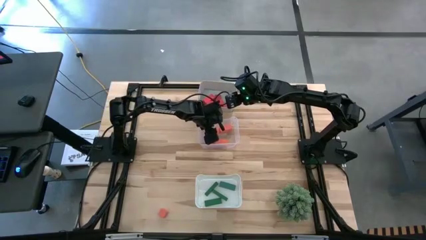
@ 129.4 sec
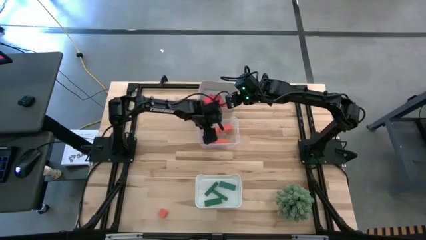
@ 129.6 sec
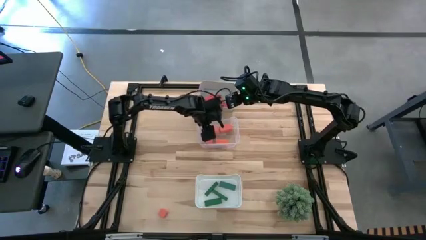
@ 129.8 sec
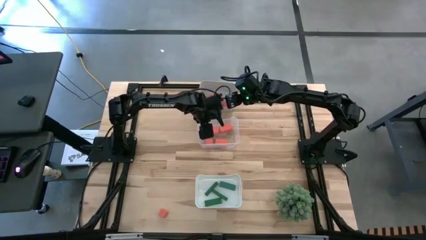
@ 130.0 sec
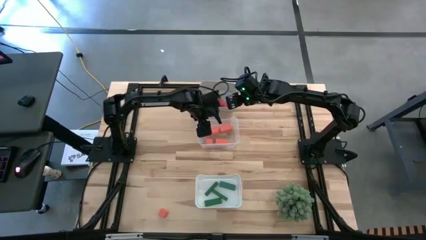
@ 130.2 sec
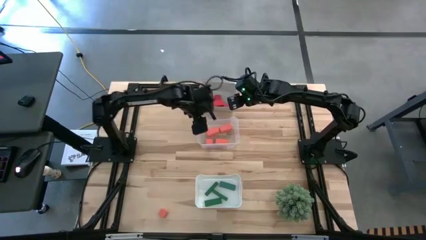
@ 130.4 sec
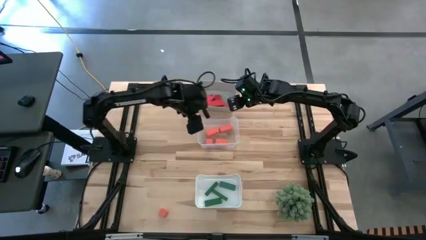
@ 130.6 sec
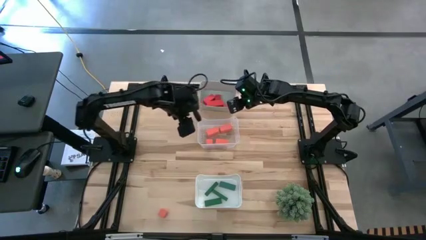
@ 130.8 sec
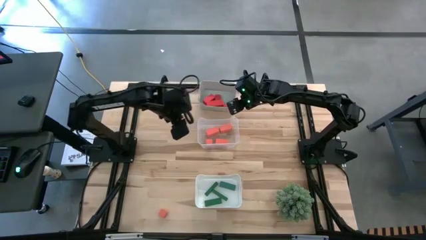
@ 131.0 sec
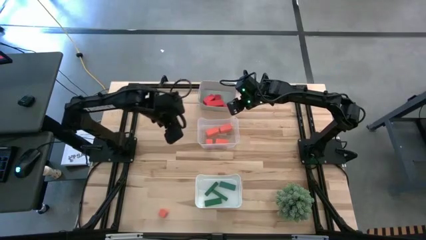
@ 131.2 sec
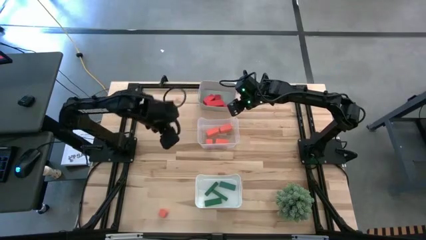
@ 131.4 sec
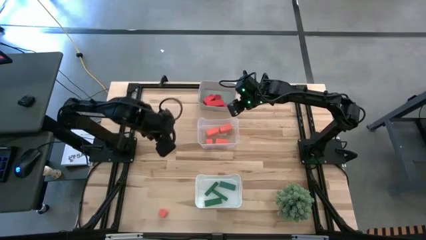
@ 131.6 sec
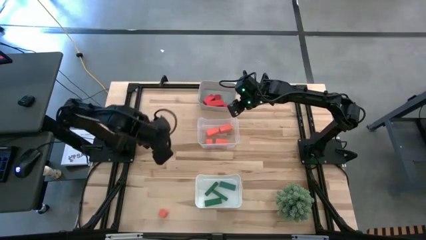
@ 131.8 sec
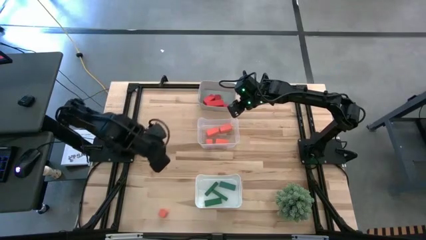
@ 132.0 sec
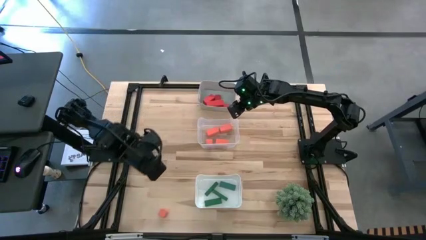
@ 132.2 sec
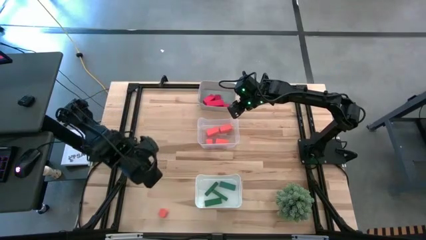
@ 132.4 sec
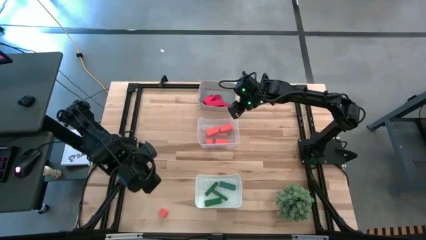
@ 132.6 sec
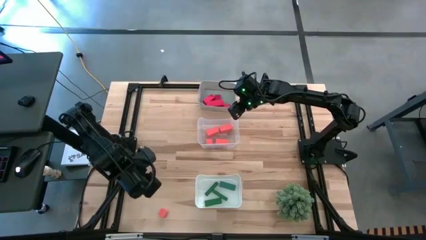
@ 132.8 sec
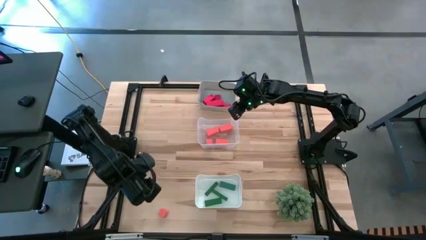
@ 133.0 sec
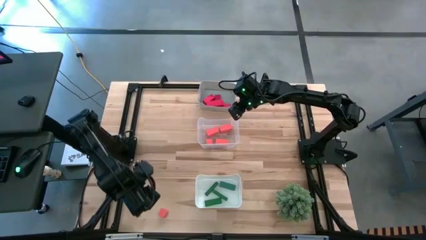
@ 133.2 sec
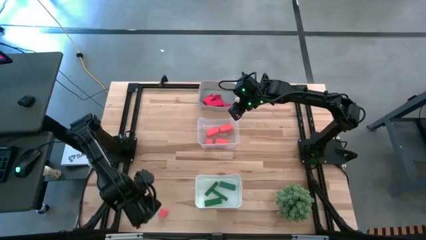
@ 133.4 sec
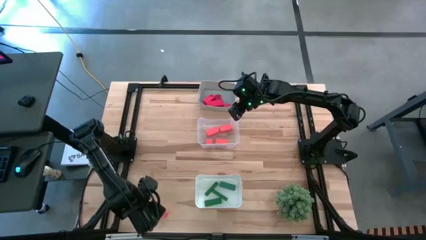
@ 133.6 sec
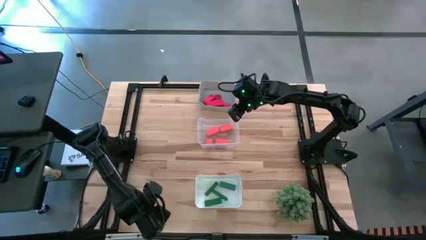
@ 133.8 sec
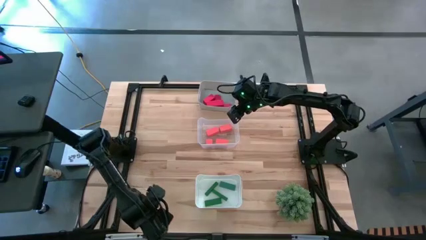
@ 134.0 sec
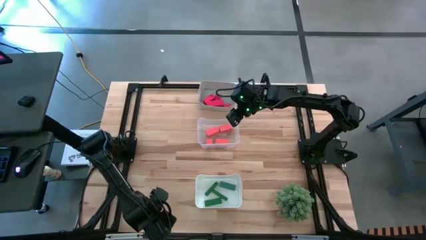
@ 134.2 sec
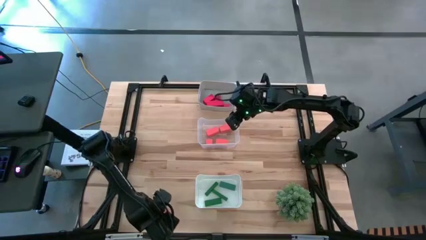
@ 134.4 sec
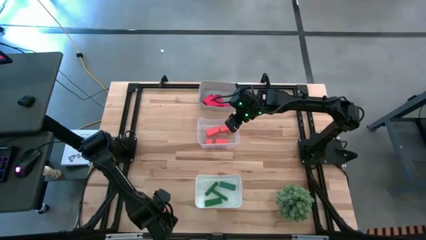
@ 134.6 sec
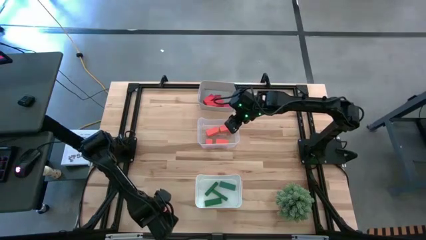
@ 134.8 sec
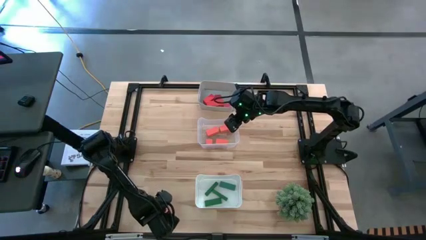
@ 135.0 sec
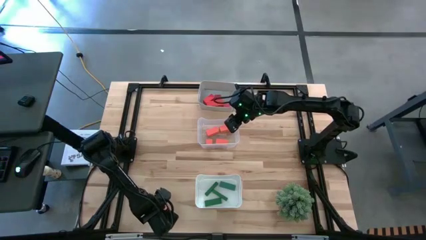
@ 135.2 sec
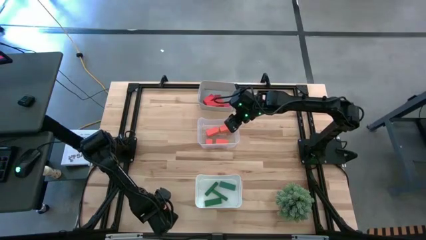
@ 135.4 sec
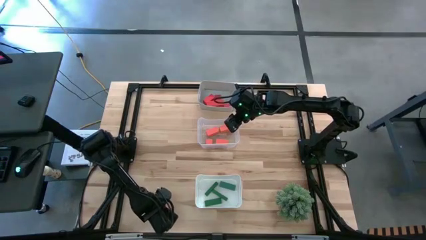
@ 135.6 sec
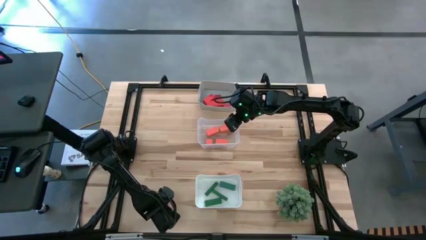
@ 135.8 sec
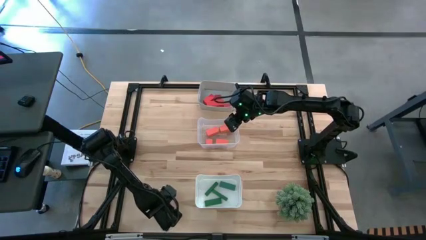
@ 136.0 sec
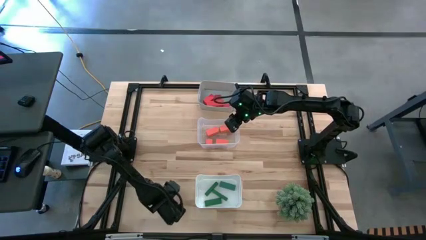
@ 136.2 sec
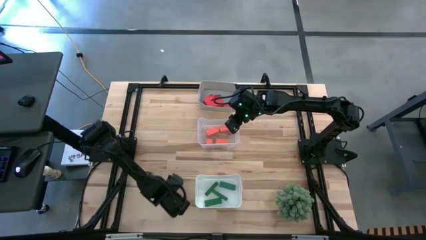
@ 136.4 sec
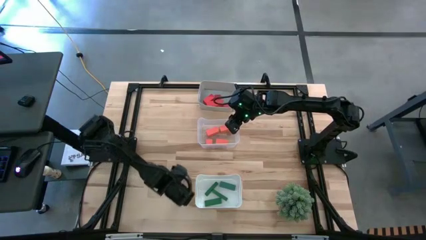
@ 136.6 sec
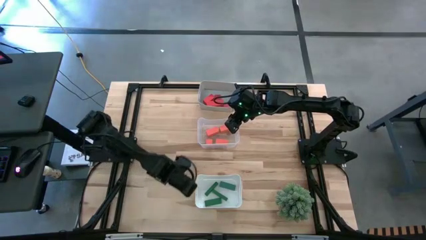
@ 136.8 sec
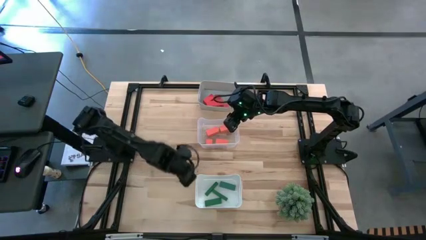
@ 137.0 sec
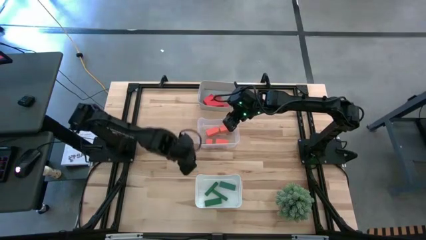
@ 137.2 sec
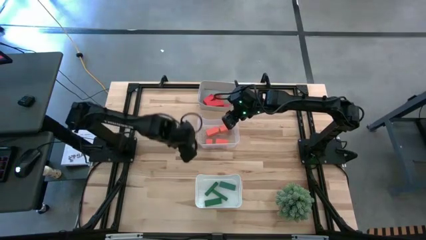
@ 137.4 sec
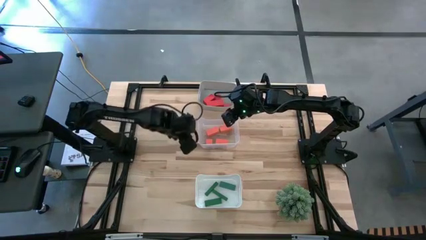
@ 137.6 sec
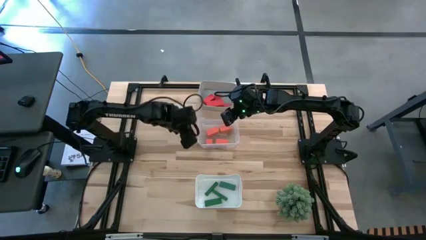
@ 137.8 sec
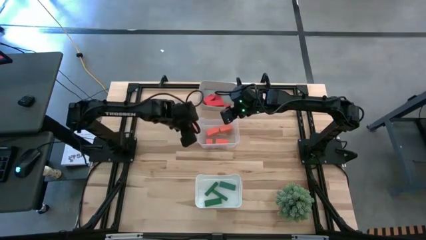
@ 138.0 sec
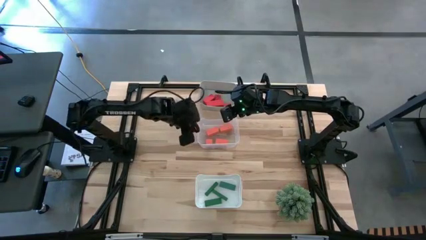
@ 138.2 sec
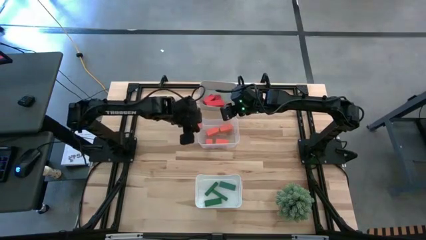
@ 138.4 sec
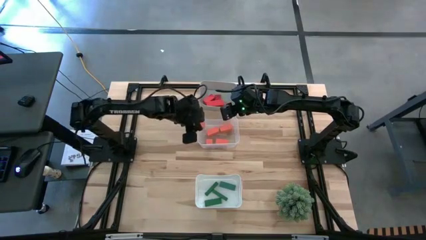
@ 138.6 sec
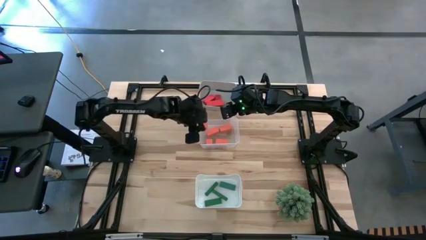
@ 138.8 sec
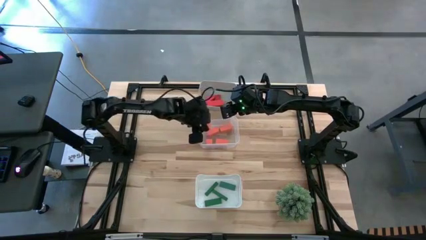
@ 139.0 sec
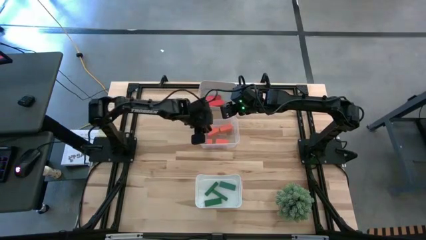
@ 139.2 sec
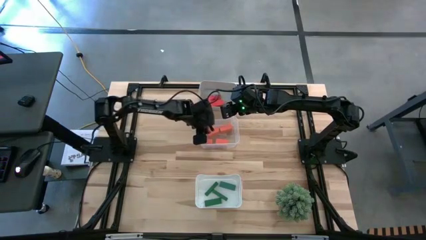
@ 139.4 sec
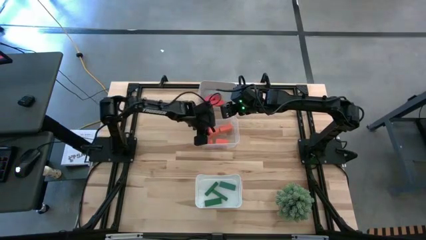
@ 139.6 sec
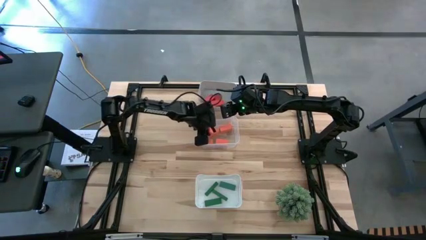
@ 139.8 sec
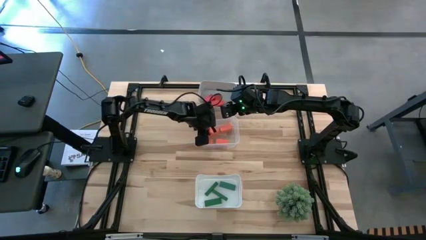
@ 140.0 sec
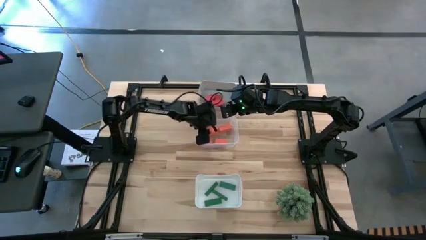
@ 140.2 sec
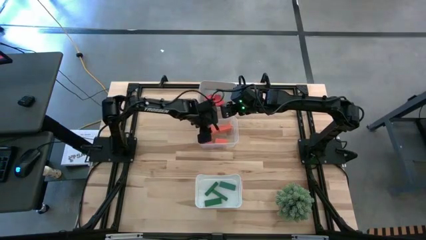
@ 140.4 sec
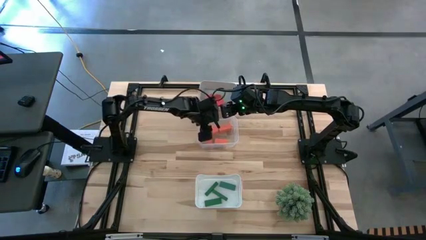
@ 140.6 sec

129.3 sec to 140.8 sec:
Task: Sort & place blocks by color
Put the orange block into the transparent bin
